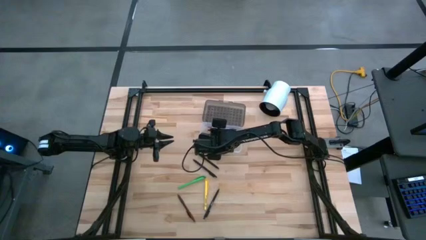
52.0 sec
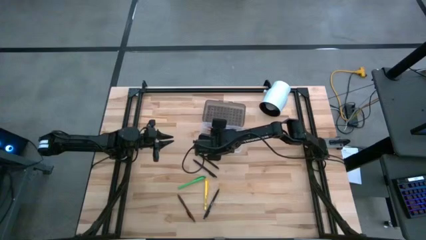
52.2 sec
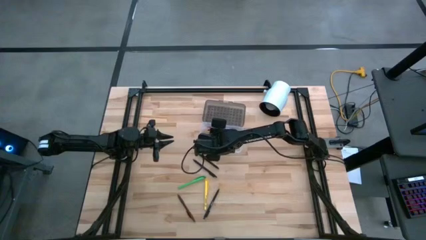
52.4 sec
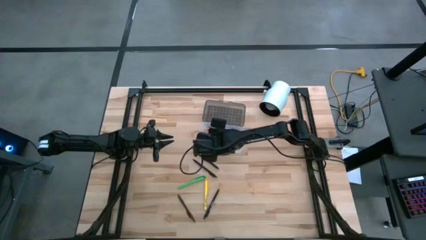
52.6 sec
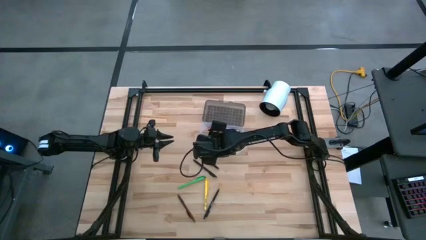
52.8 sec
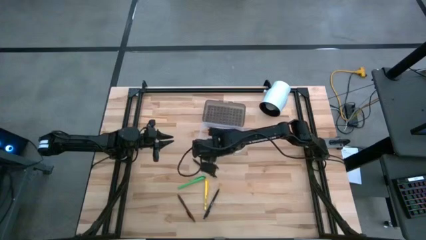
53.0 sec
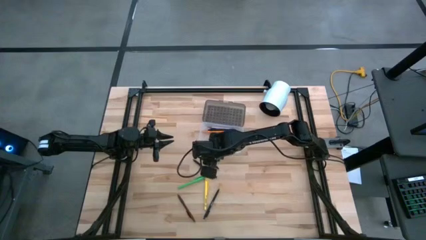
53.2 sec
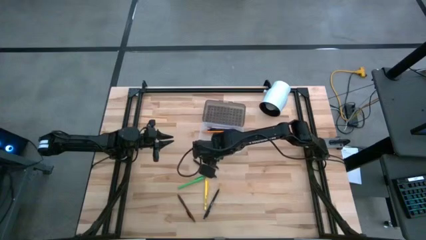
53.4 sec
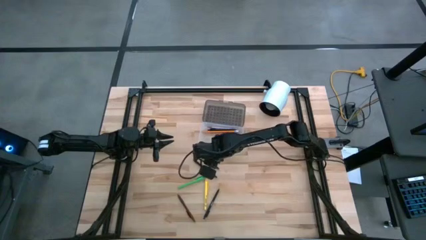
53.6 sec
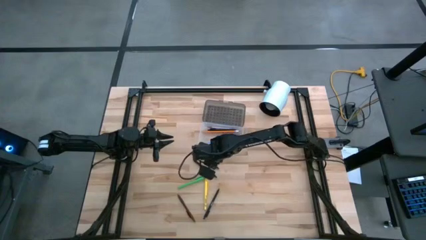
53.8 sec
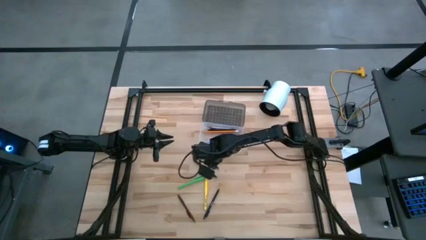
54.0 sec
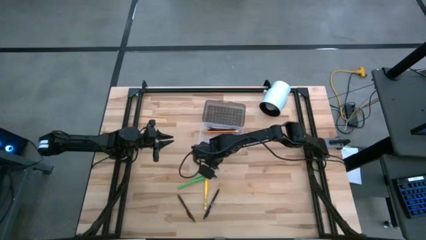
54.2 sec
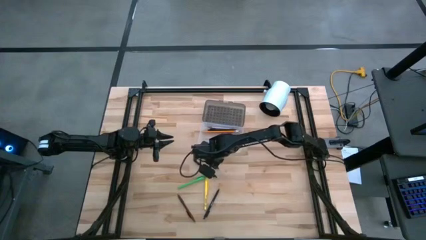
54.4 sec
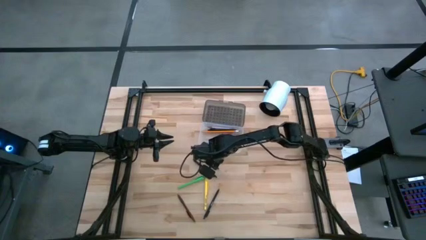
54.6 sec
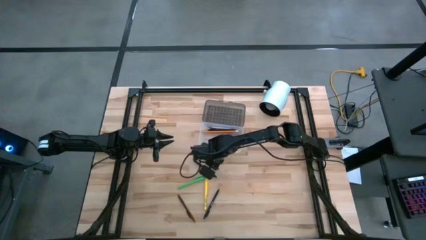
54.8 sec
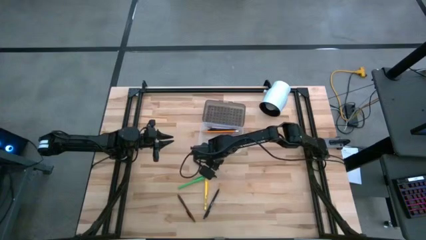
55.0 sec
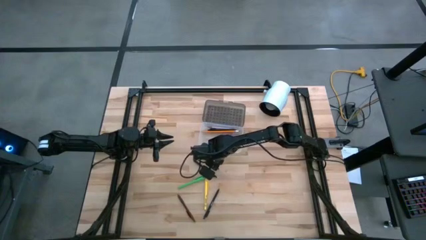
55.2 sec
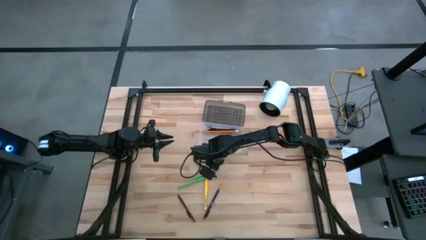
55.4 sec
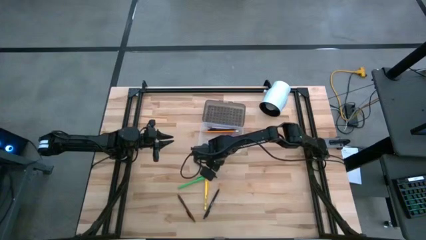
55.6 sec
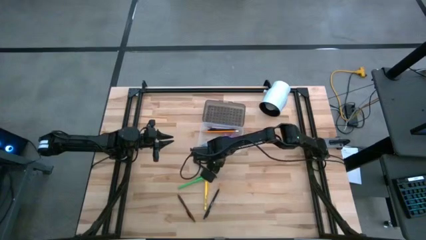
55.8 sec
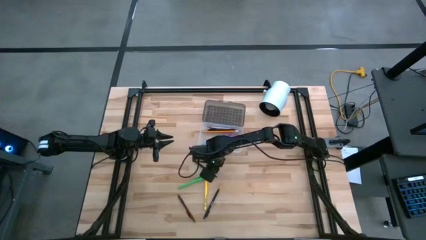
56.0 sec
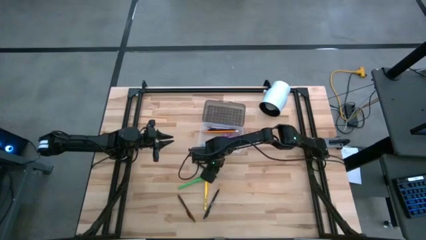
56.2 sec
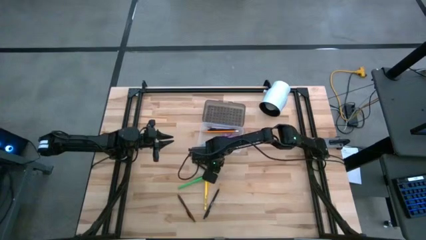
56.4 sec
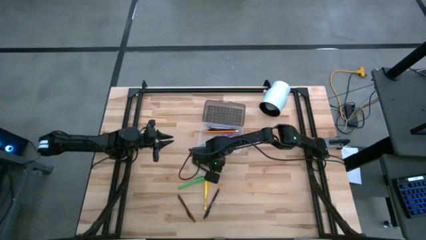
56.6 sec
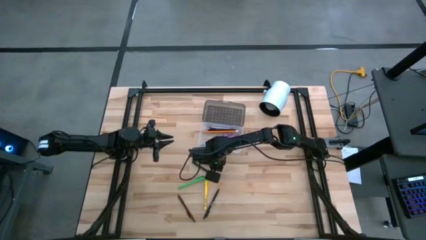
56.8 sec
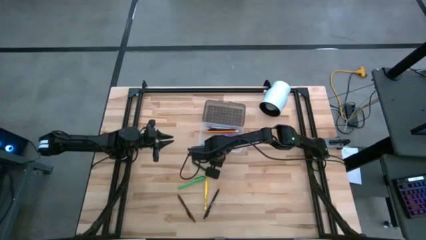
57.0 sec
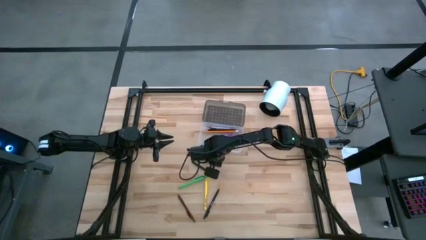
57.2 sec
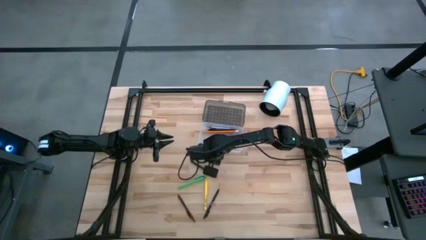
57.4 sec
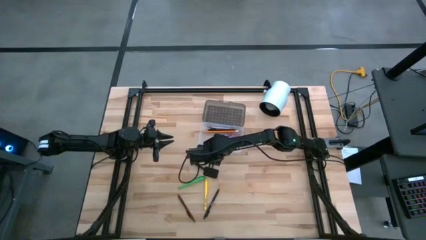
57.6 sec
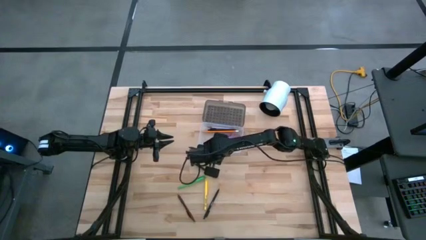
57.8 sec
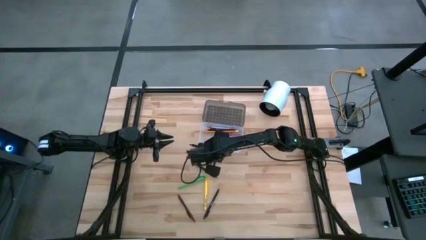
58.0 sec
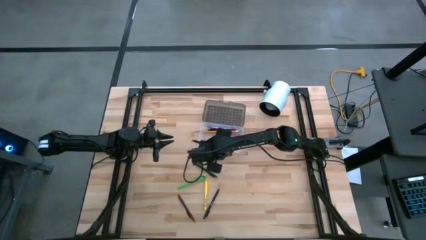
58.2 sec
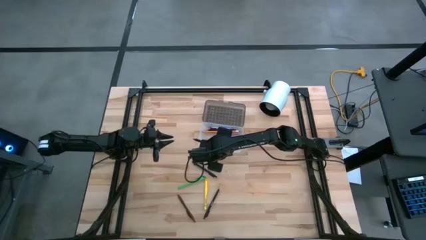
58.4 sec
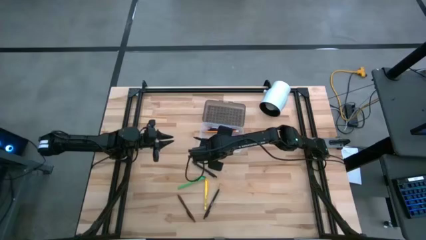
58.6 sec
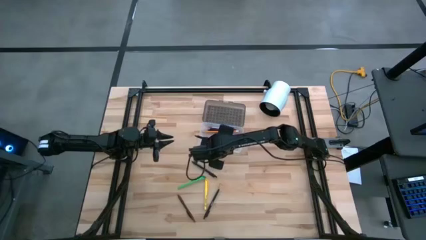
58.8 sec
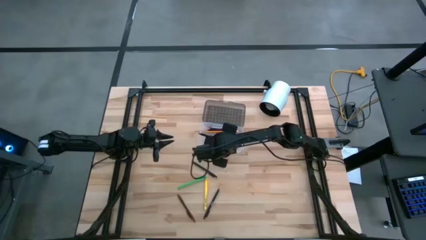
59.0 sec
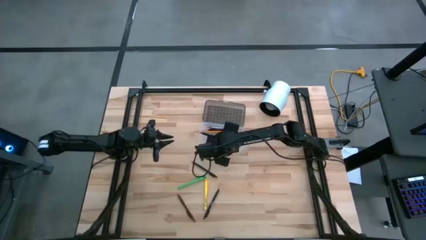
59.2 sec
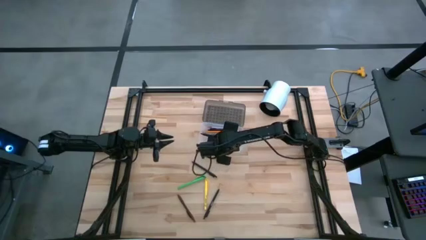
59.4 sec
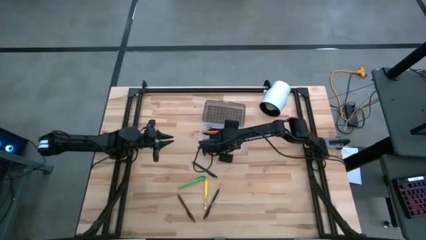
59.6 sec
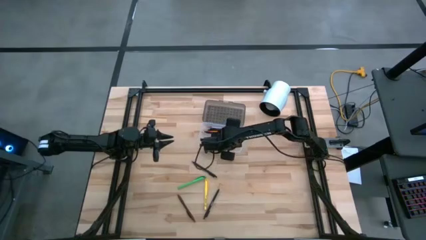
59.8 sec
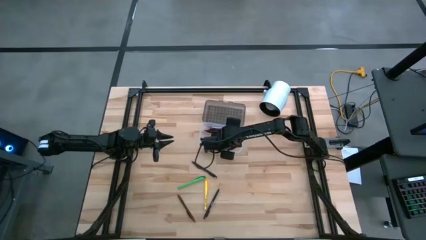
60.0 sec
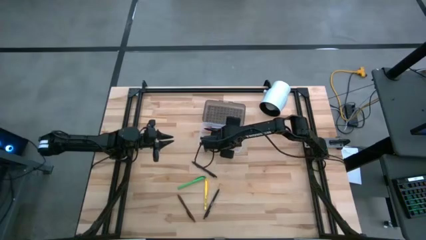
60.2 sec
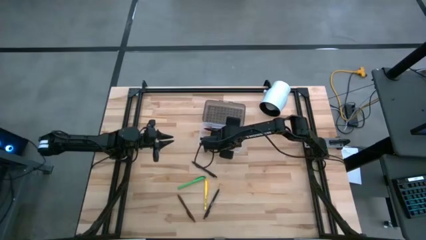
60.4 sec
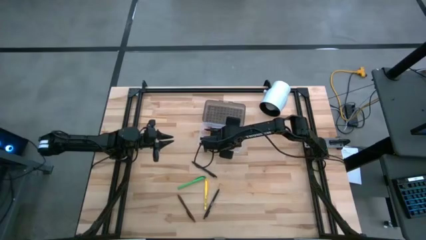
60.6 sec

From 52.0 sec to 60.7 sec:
Task: Pick & place school supplies into a supply box
Put the black pen into the supply box

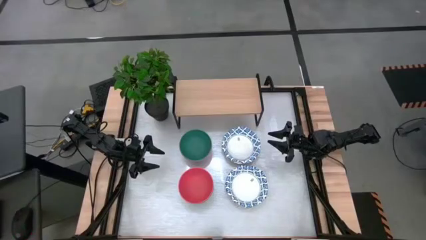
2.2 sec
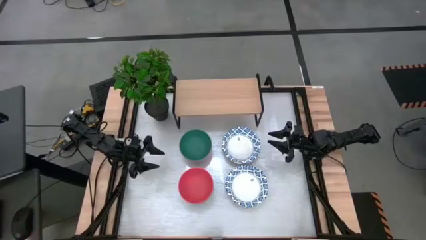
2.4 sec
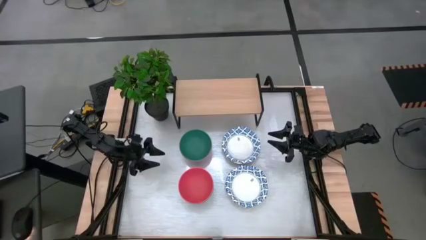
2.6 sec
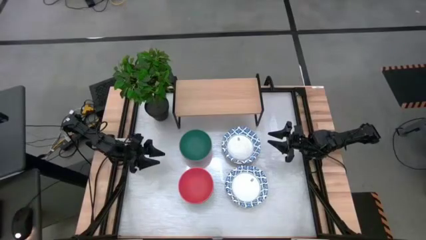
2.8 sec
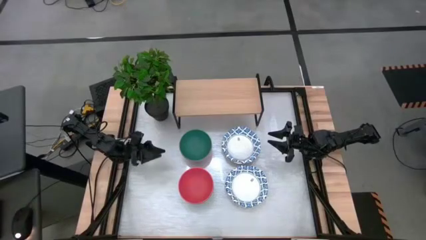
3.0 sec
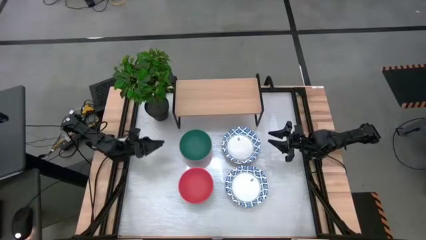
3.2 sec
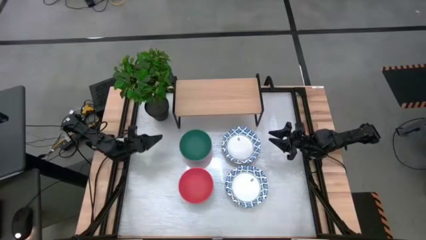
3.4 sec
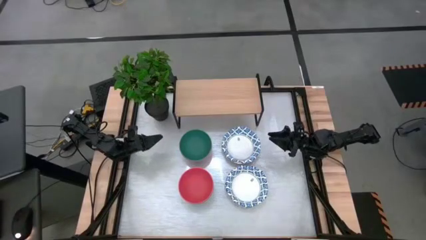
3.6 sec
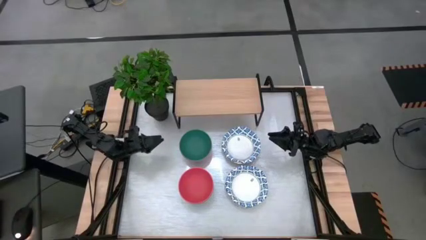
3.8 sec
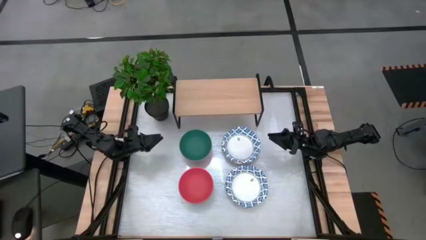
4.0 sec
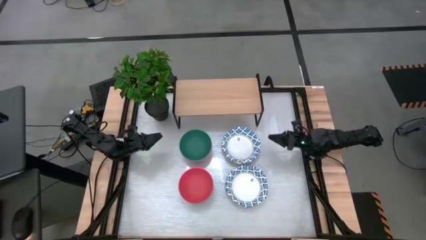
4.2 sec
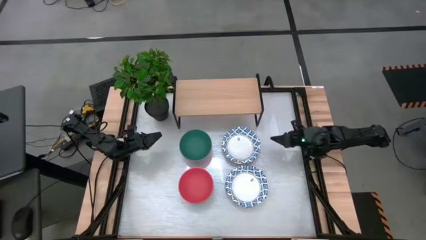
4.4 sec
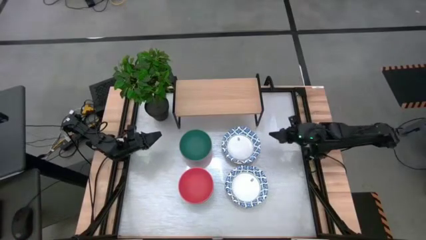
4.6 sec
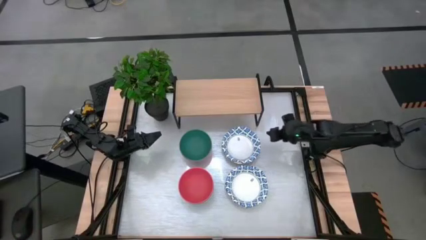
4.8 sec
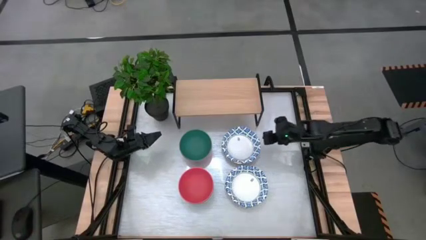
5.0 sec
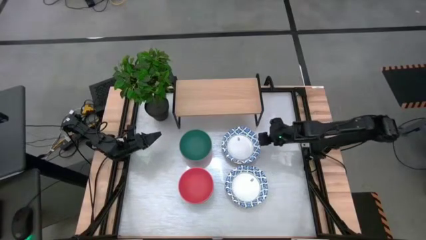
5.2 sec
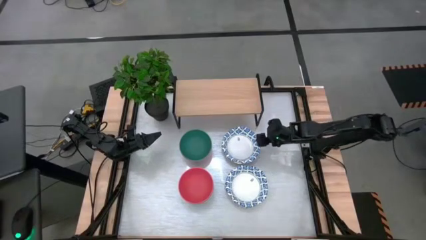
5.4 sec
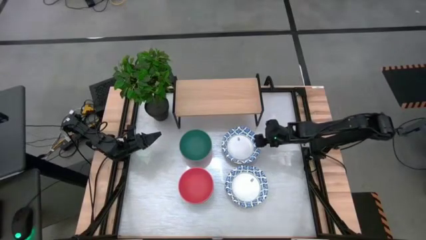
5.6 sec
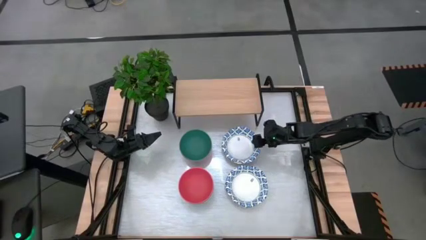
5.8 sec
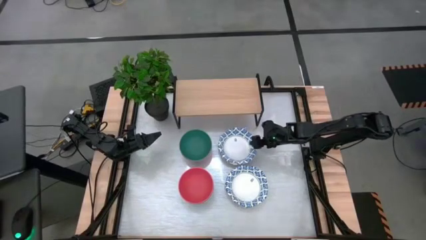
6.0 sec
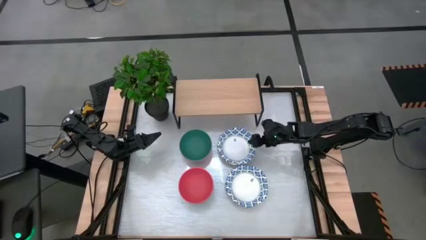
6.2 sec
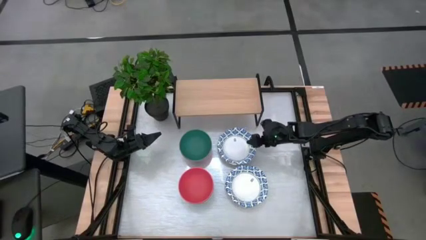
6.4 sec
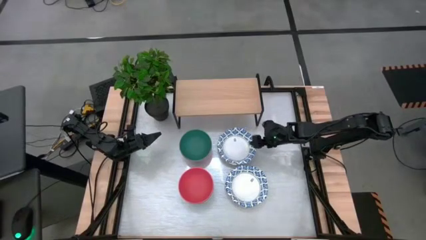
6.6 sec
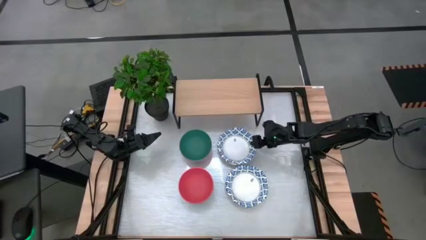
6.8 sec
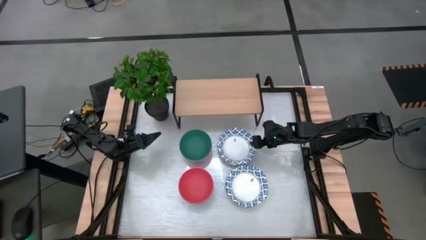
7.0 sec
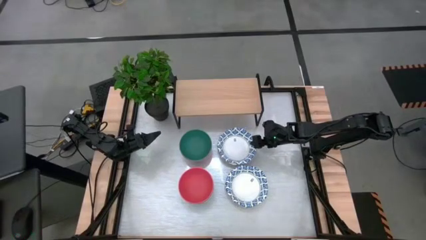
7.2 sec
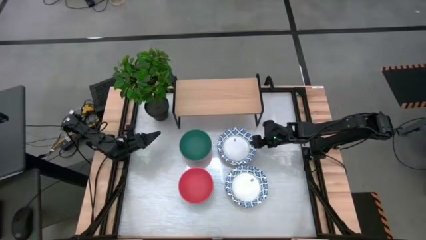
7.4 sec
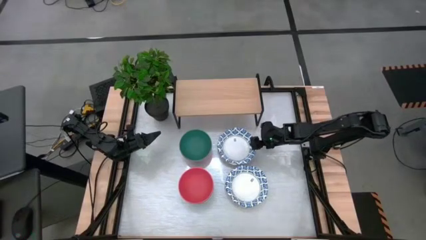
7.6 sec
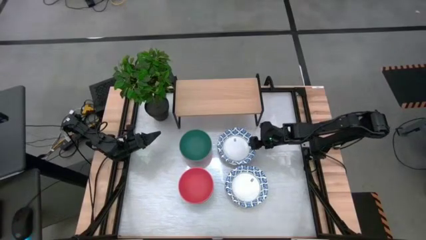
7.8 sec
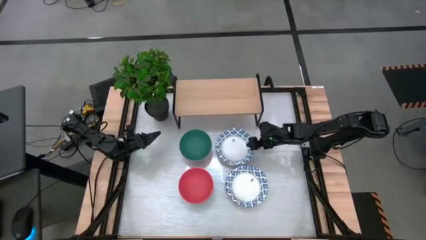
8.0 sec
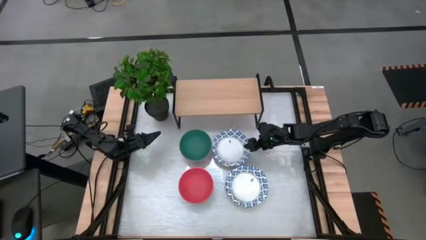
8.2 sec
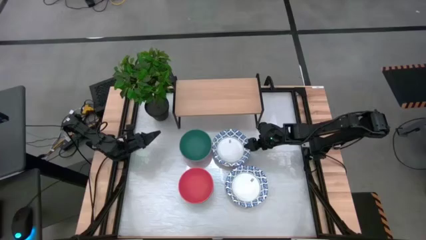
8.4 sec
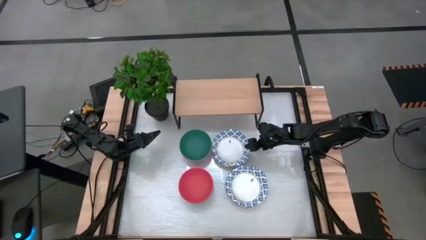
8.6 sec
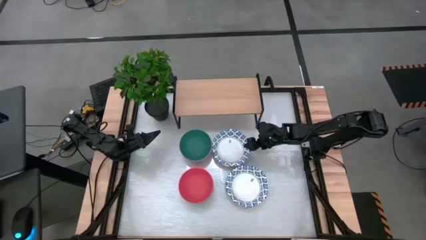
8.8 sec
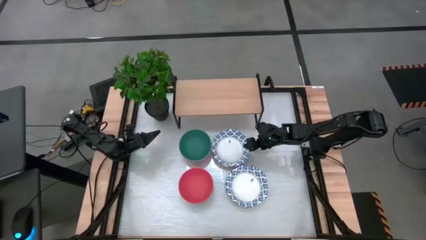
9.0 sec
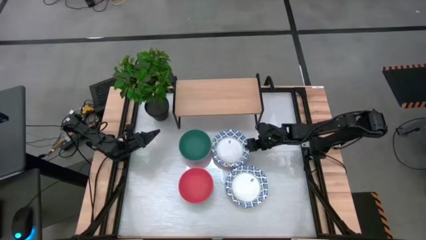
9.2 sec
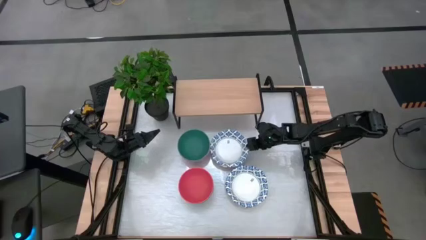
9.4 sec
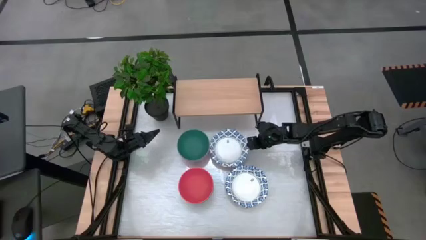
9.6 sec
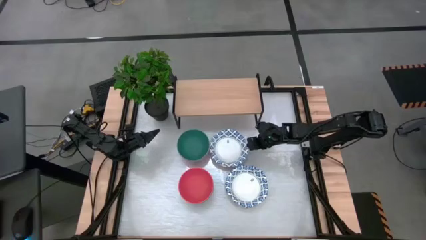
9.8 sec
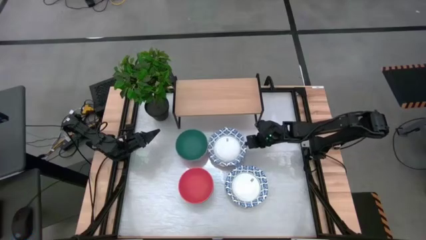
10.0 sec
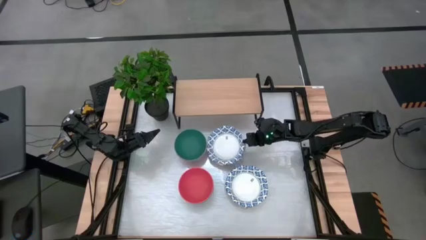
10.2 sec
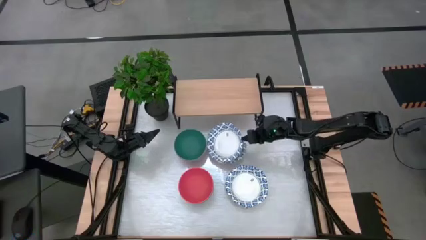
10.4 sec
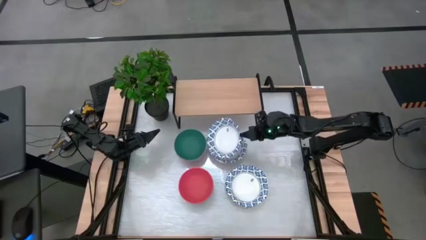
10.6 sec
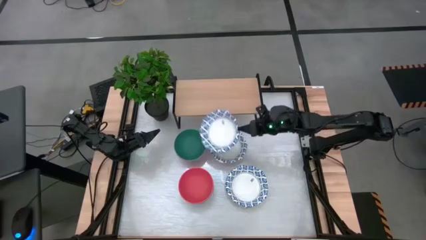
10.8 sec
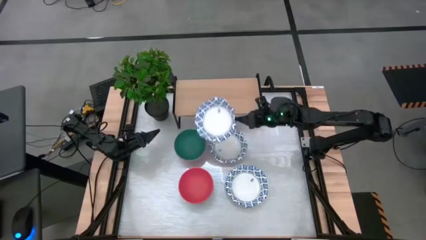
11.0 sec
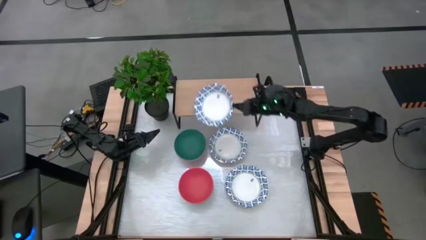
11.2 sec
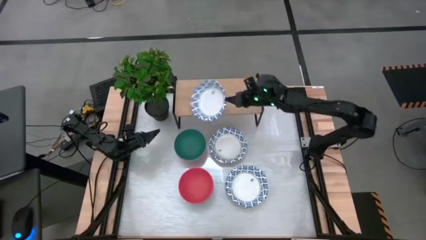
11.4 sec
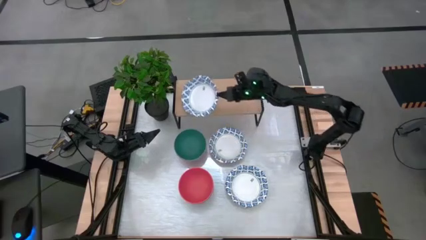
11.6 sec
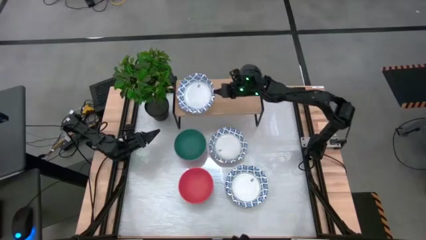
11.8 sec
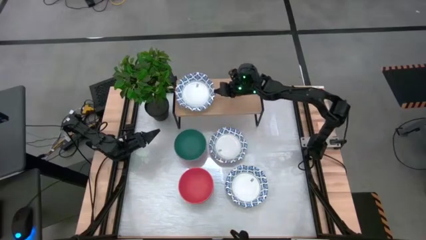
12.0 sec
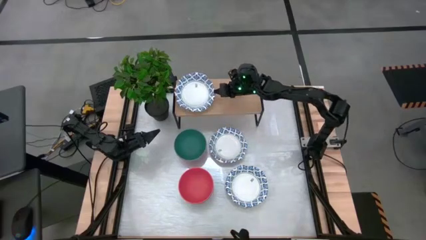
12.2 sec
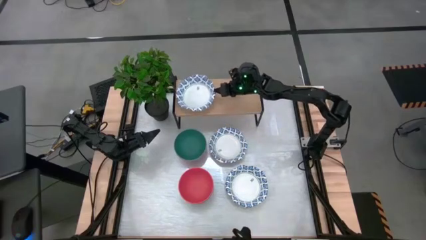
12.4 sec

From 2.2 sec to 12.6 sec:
Task: Place and stack bowls onto a shelf
Put the white bowl on the shelf
